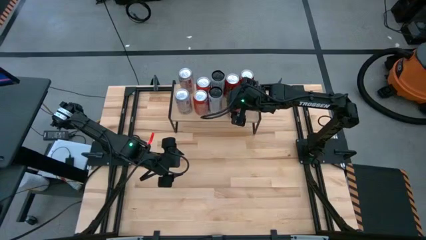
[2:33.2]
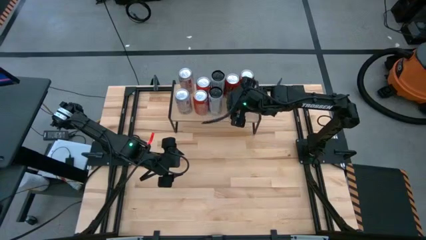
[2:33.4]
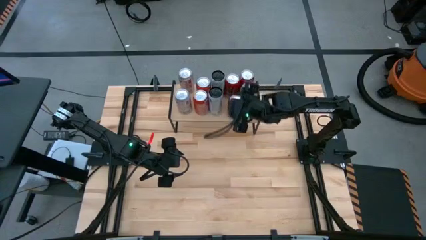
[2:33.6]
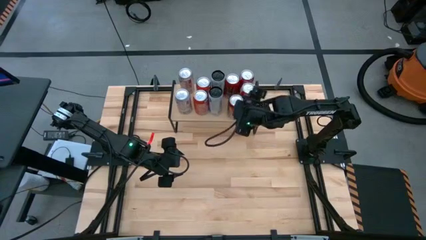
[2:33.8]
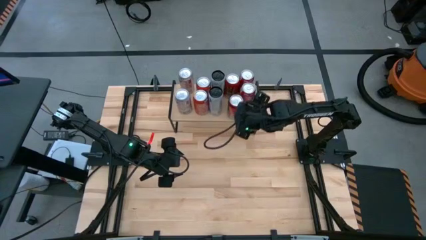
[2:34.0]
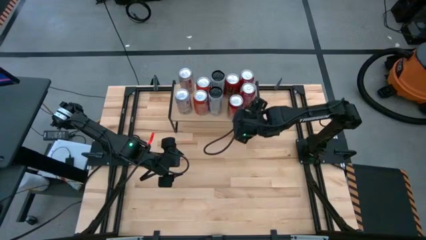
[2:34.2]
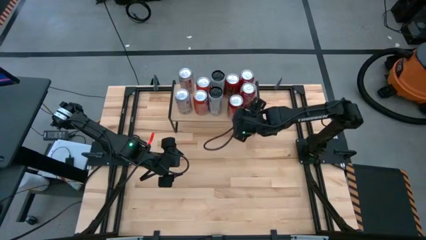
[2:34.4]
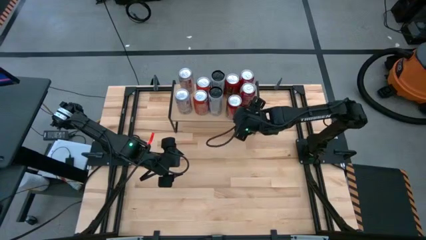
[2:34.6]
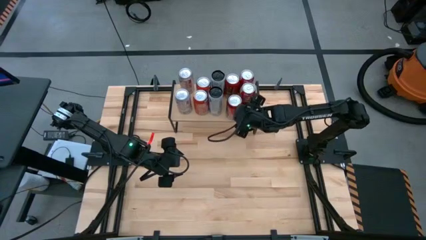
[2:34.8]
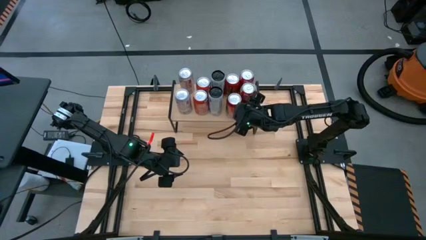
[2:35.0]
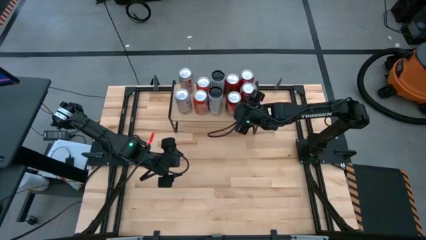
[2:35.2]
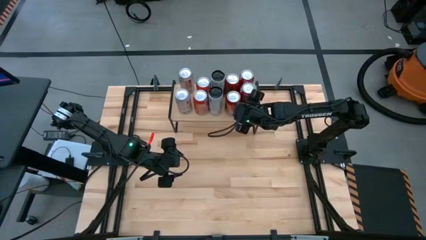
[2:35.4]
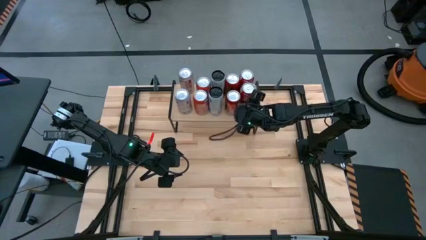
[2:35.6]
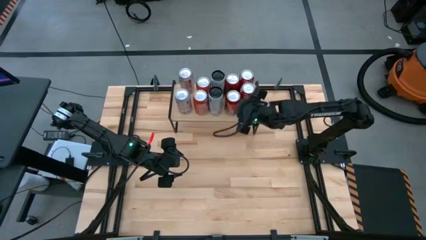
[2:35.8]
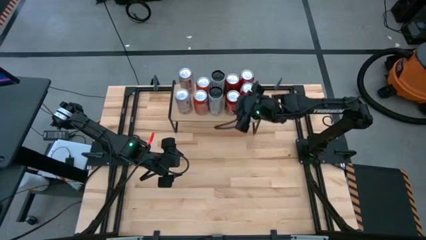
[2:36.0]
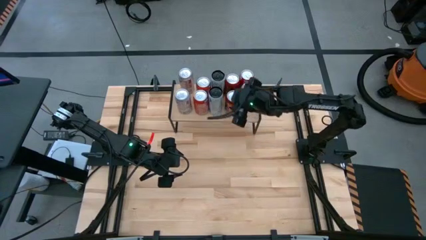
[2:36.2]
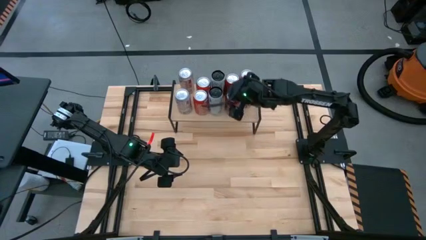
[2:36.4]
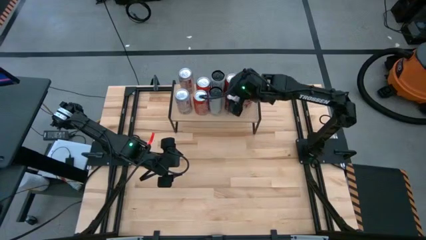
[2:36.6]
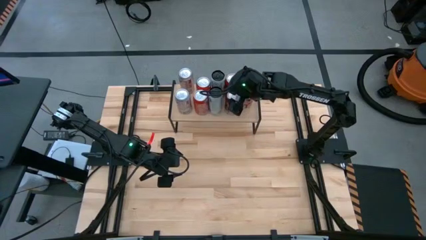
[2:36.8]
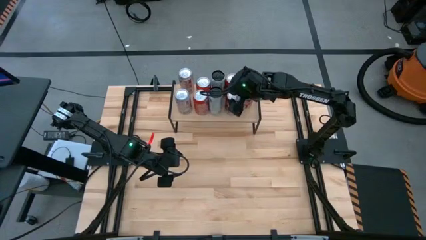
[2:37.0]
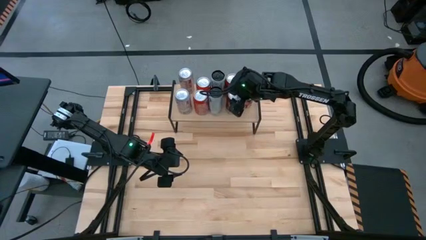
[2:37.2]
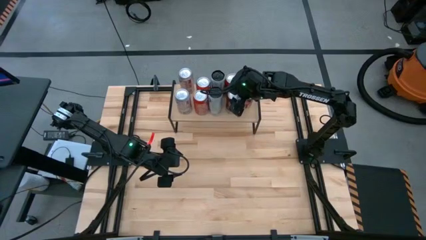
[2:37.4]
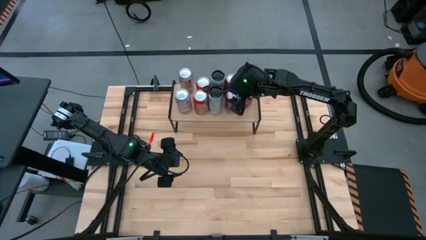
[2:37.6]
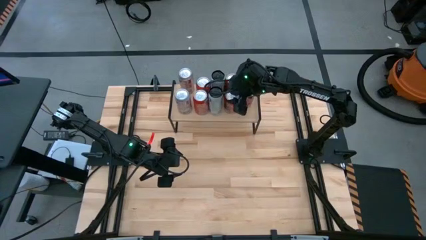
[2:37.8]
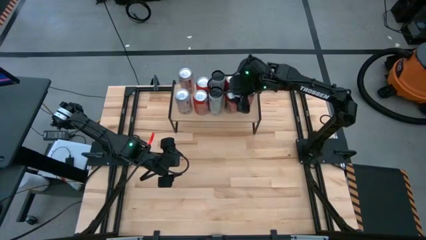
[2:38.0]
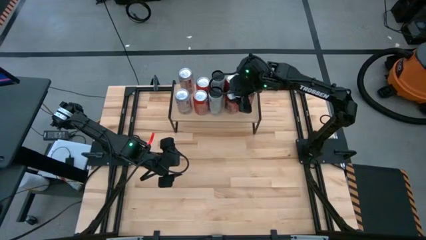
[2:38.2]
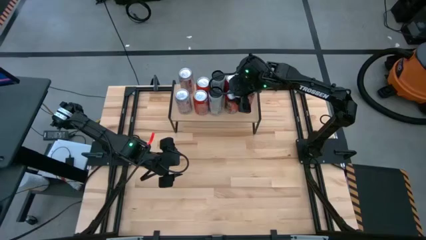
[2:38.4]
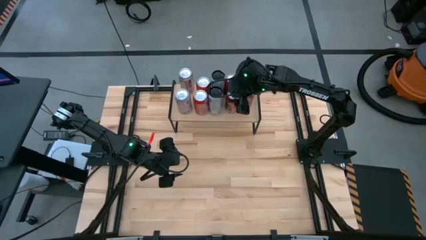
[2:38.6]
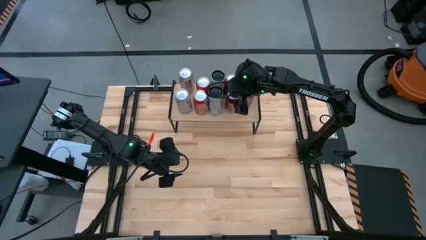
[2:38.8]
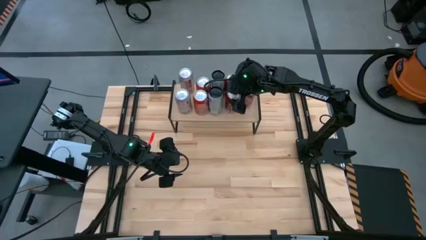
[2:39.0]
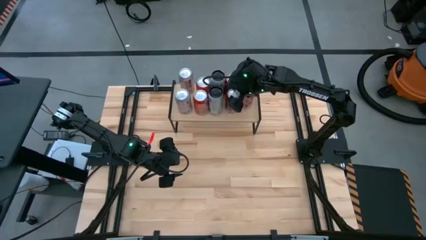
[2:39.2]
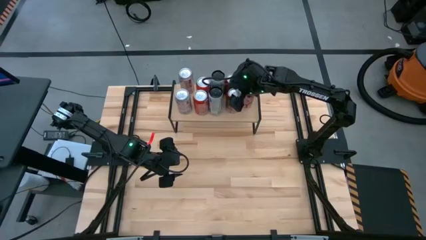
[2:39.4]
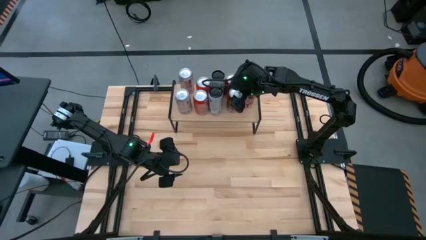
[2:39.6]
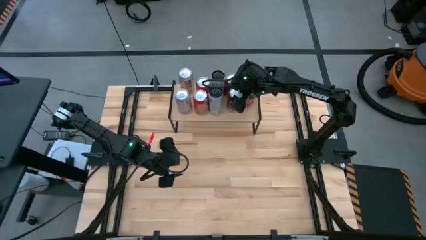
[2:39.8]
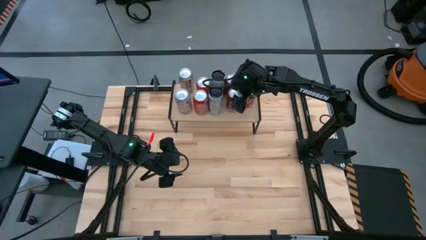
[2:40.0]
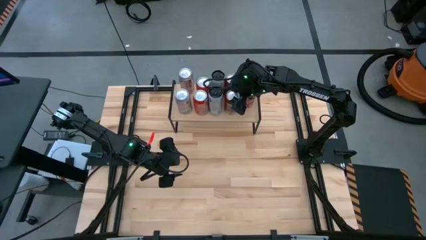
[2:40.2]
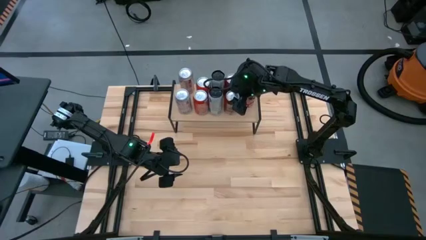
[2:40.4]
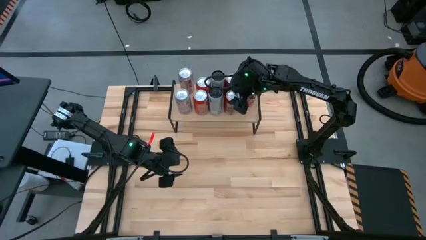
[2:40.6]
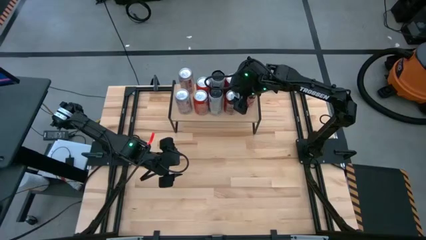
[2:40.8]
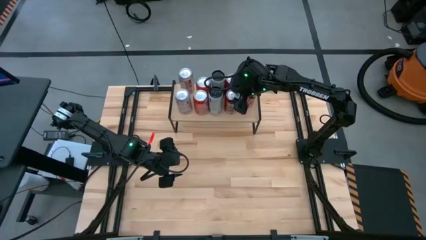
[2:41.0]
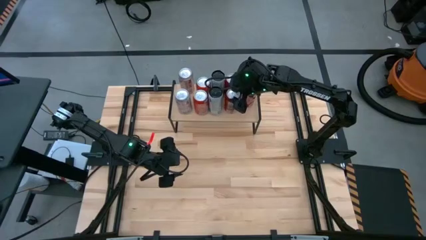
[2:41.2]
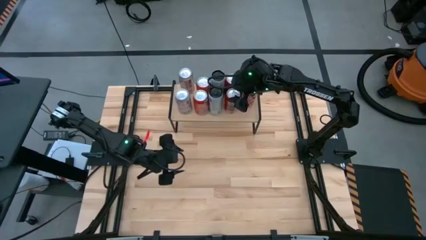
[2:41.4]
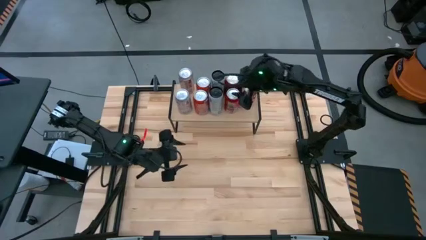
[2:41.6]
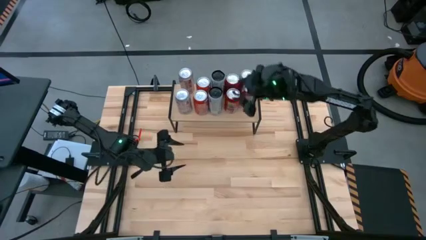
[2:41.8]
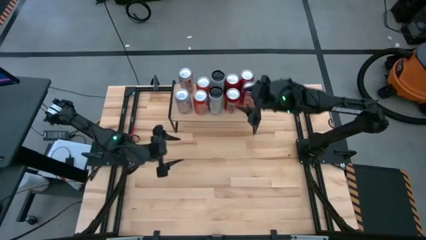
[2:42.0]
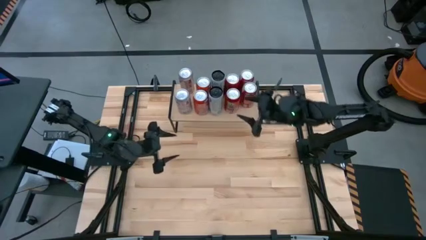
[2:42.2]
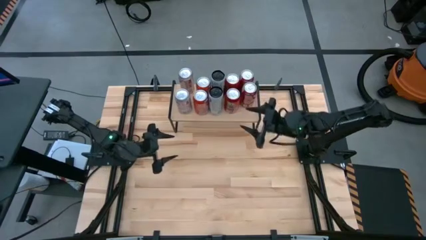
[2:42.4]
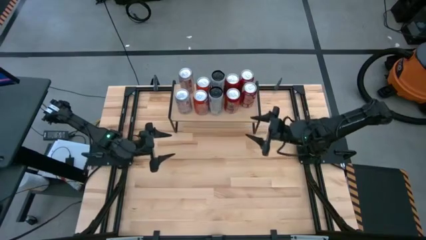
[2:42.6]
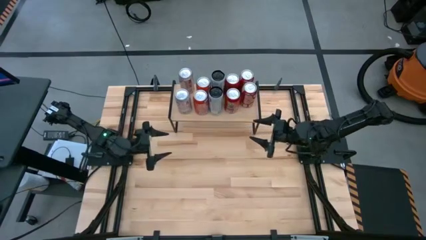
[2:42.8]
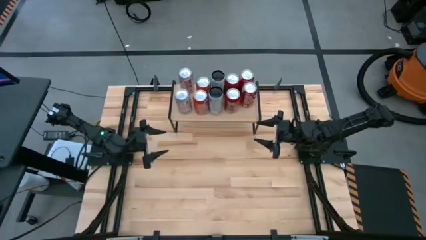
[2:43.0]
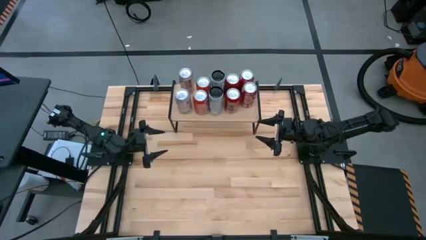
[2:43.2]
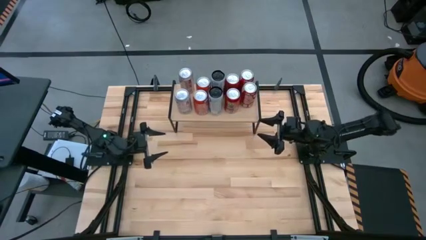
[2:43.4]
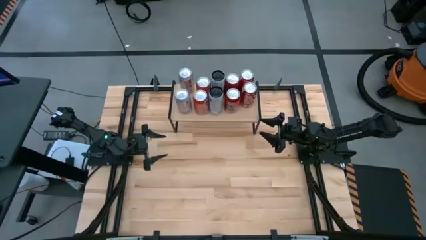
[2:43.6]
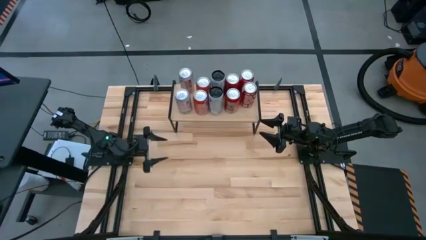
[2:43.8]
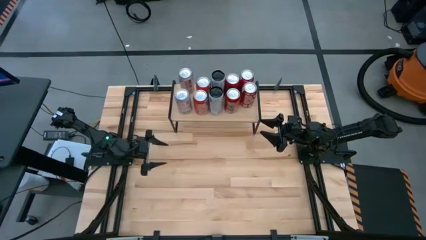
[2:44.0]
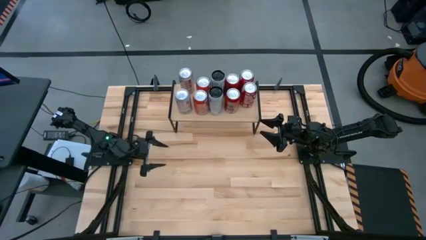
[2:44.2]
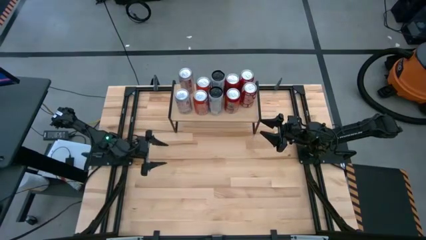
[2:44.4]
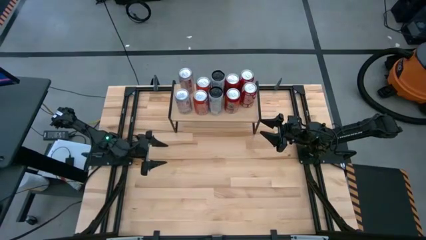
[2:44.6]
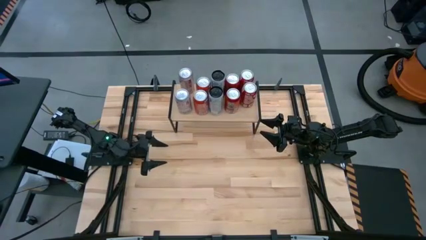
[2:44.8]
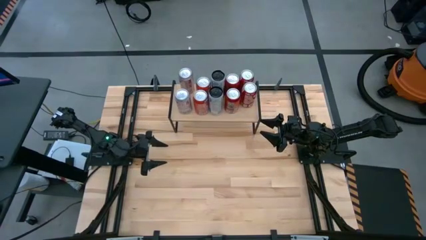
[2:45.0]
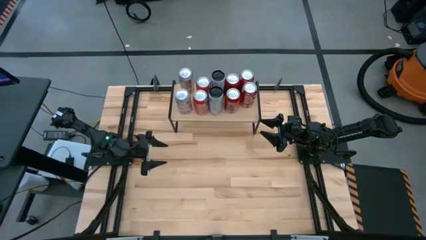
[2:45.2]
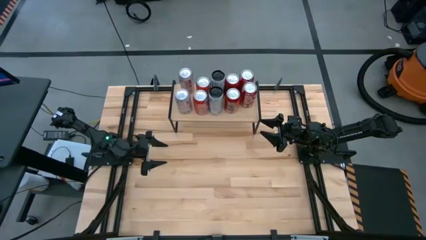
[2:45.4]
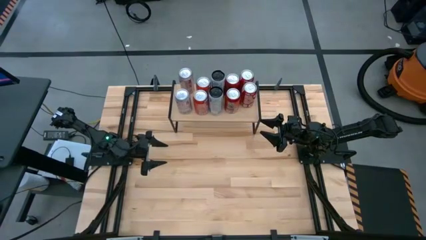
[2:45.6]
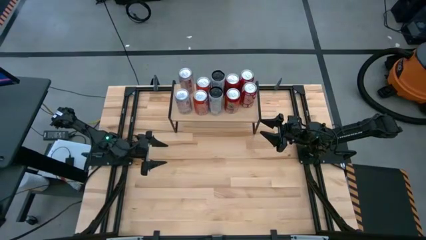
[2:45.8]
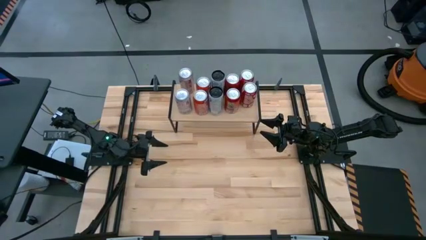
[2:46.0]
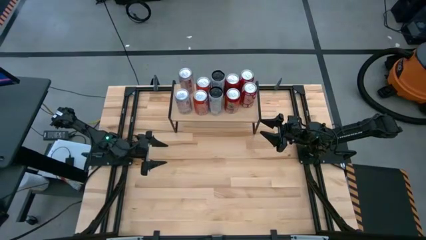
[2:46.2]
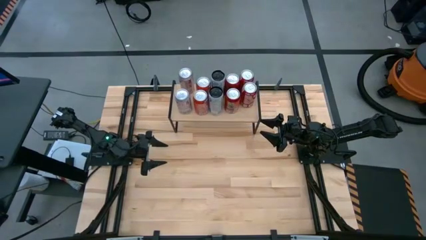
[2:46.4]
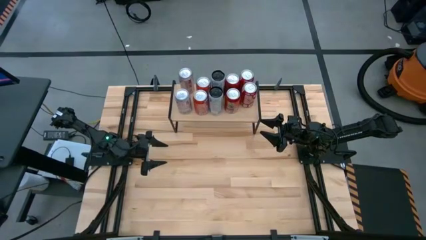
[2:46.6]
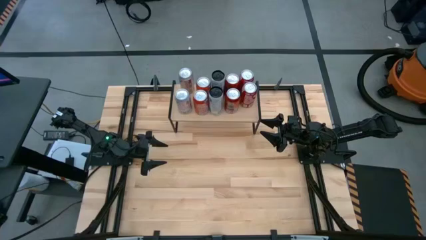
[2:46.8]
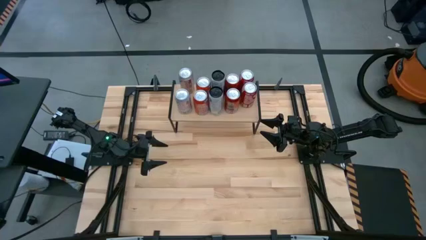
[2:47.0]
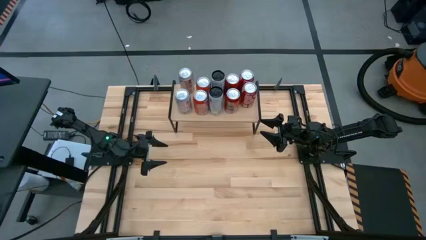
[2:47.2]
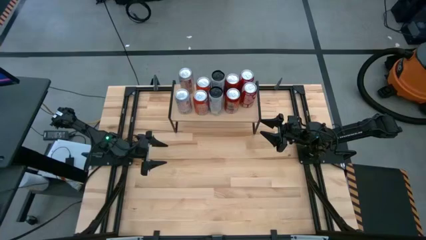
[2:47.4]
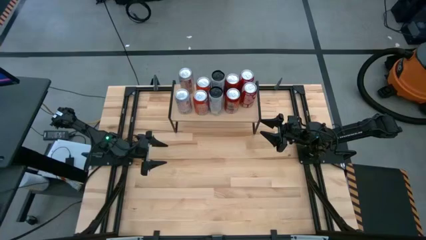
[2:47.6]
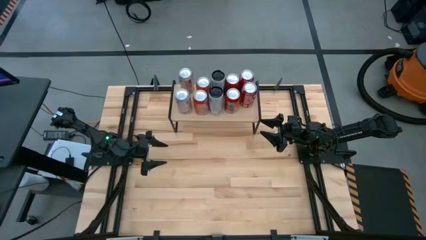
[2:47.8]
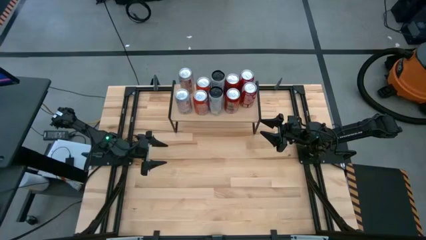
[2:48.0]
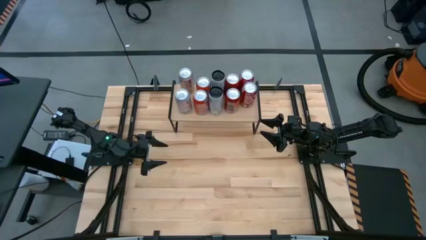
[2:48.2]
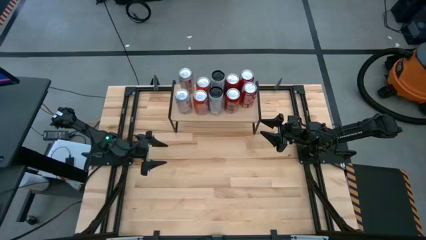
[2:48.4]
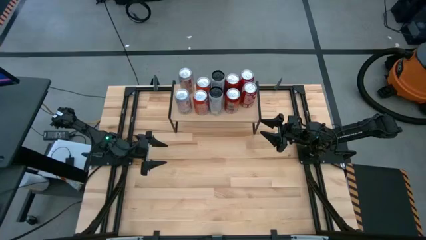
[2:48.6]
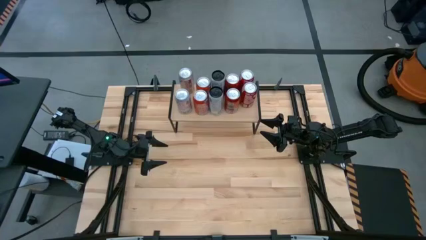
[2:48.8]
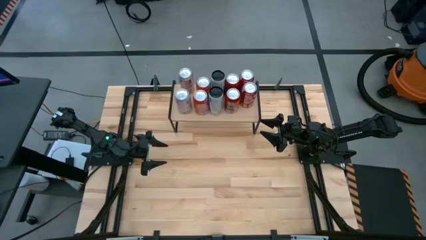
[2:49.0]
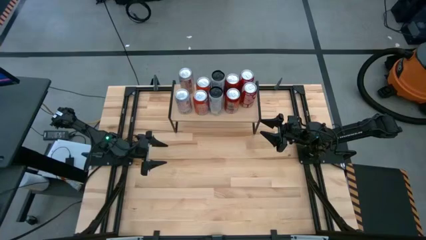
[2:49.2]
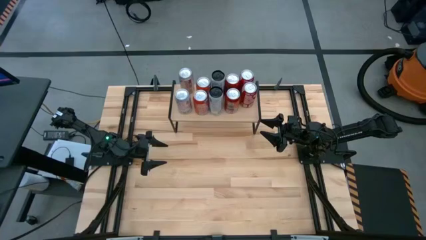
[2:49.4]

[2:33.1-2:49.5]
Task: Place canned beverage on shelf
Return to Home Position
